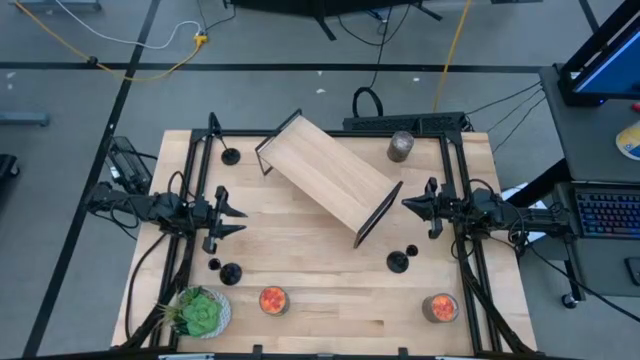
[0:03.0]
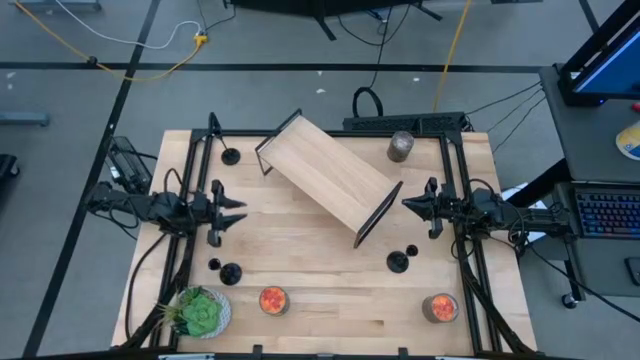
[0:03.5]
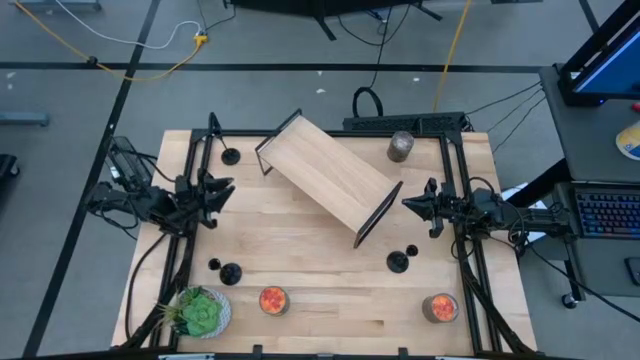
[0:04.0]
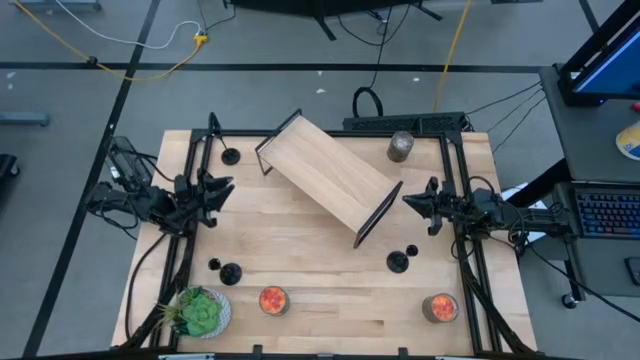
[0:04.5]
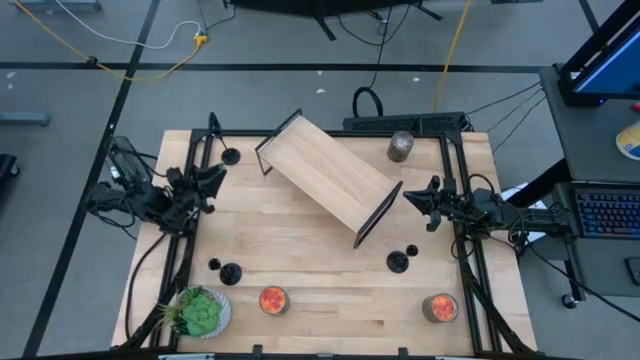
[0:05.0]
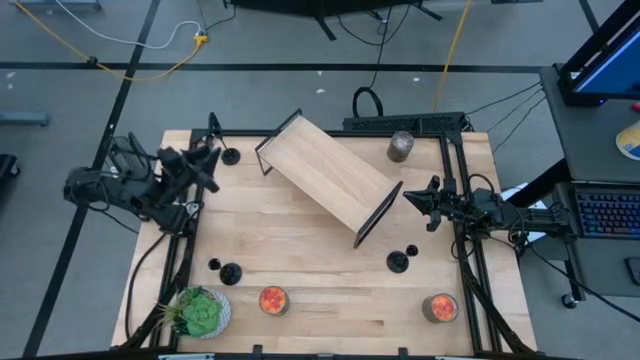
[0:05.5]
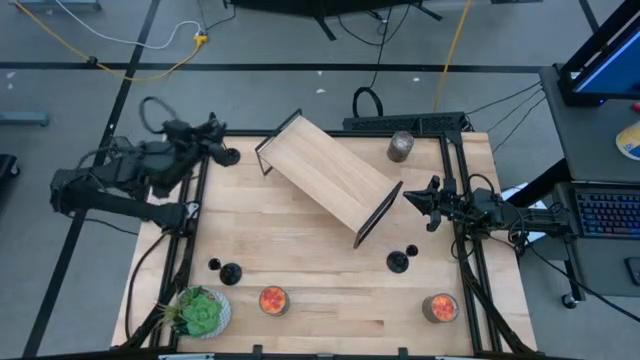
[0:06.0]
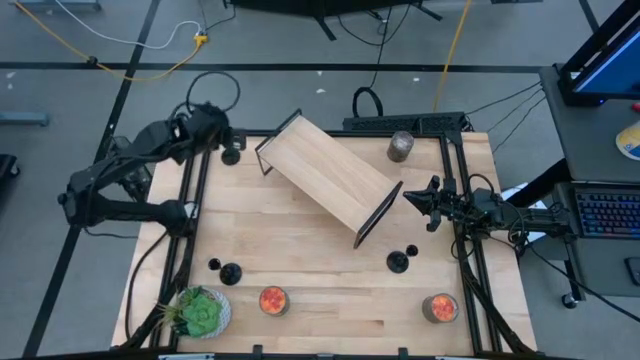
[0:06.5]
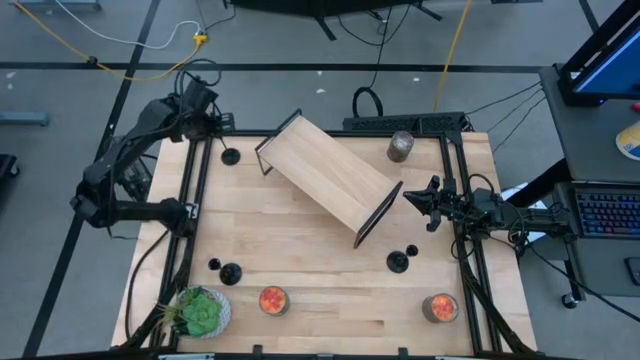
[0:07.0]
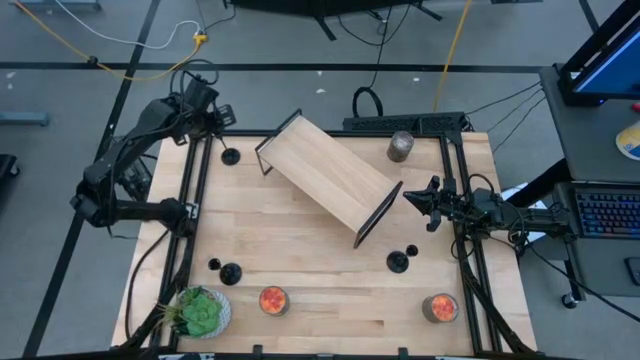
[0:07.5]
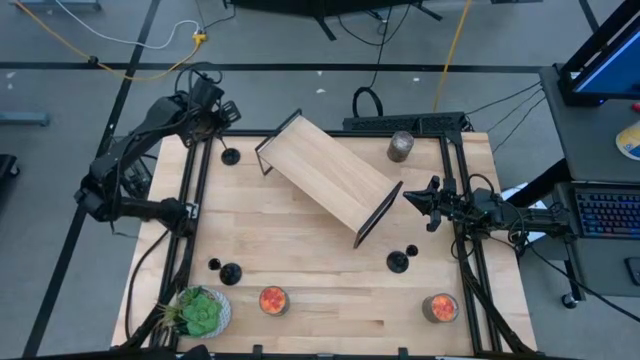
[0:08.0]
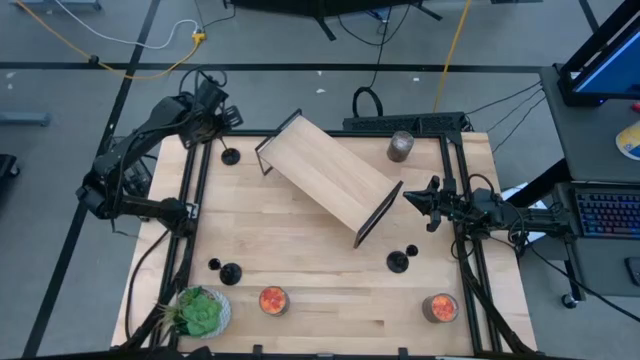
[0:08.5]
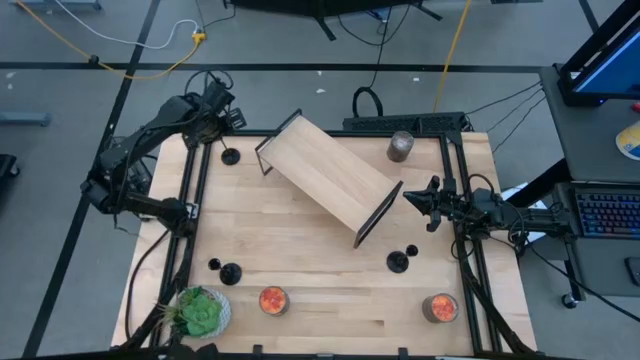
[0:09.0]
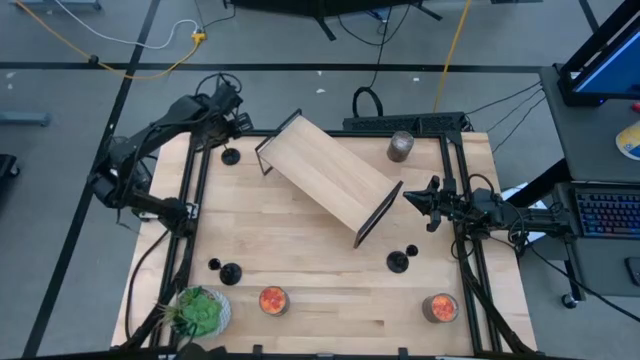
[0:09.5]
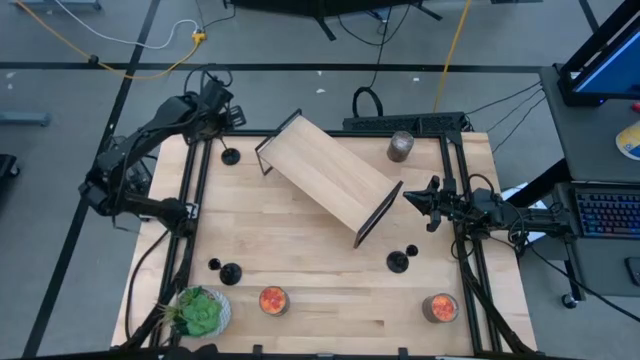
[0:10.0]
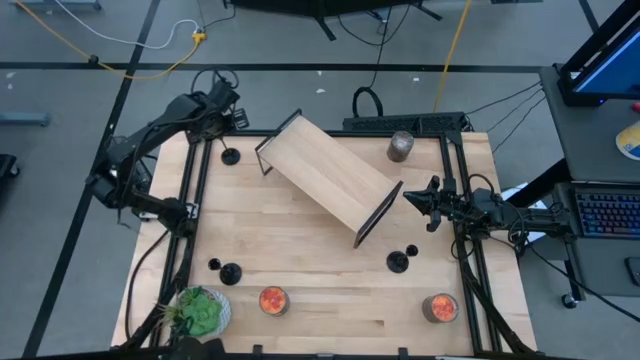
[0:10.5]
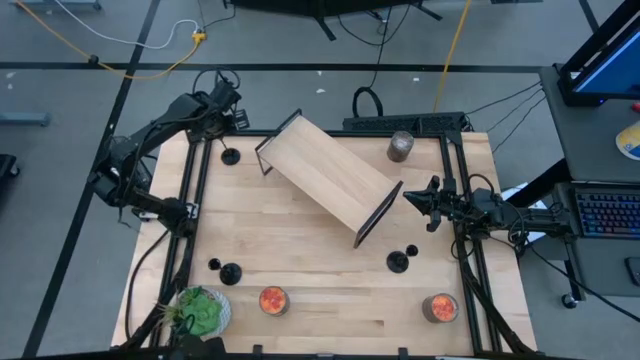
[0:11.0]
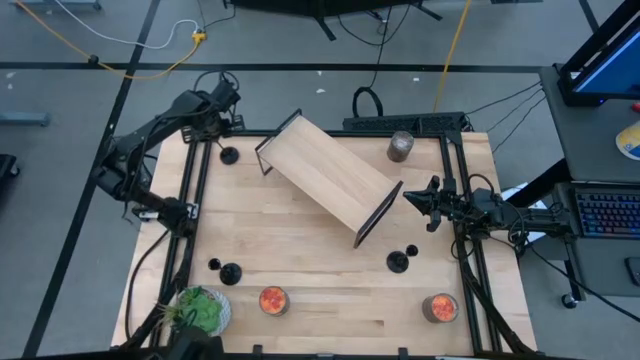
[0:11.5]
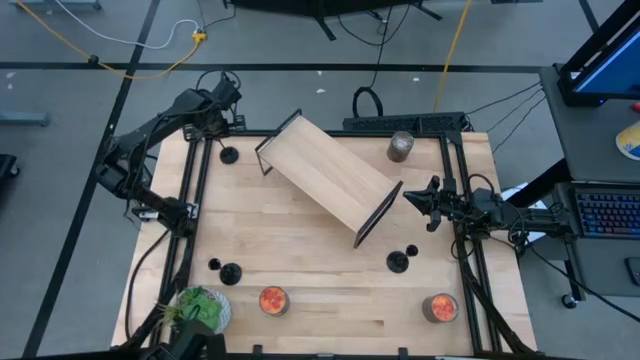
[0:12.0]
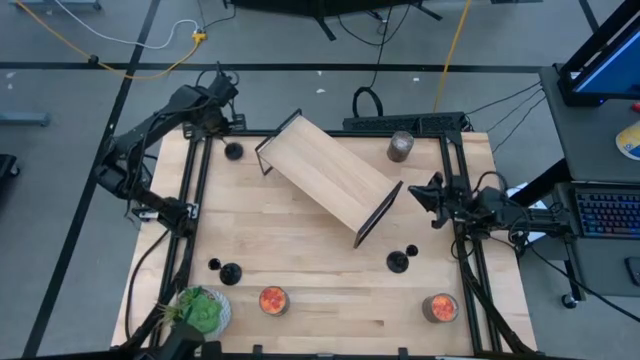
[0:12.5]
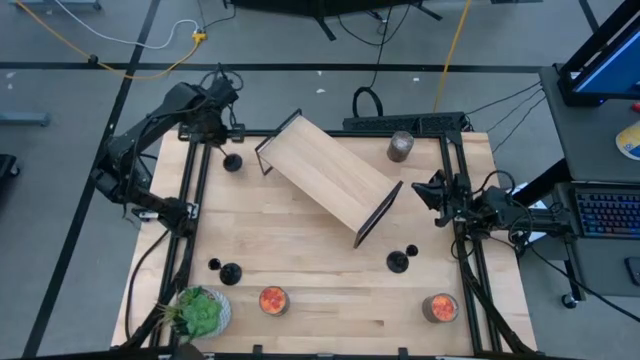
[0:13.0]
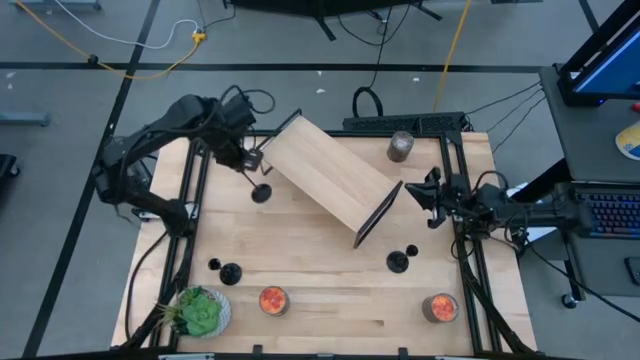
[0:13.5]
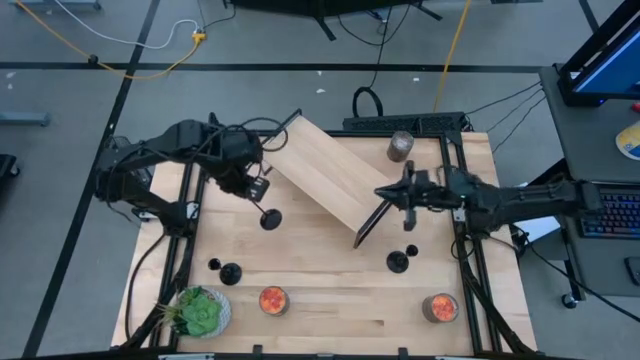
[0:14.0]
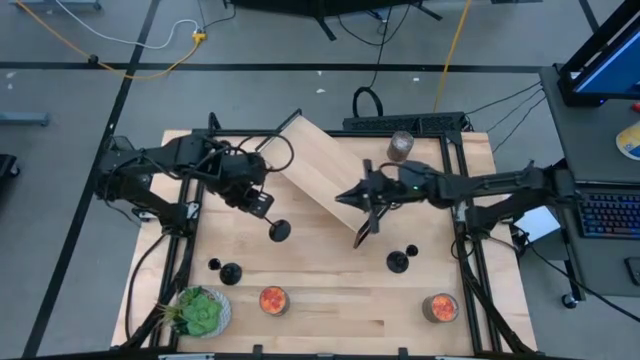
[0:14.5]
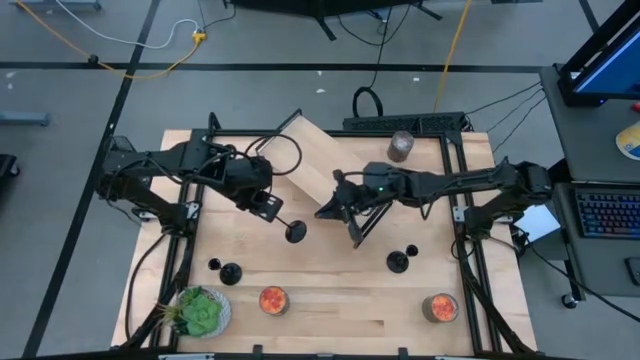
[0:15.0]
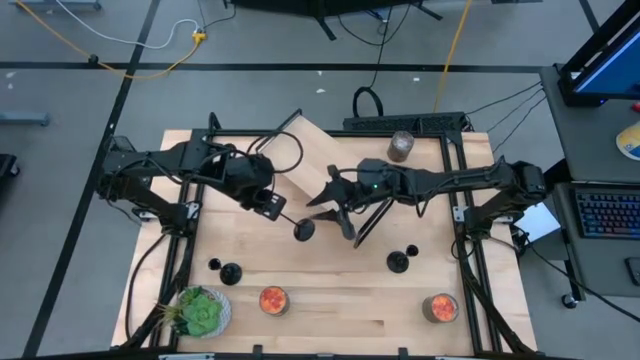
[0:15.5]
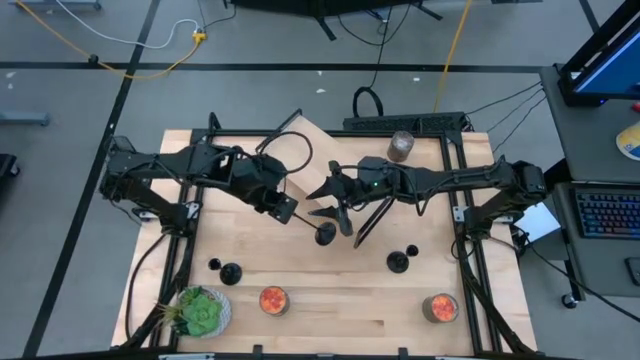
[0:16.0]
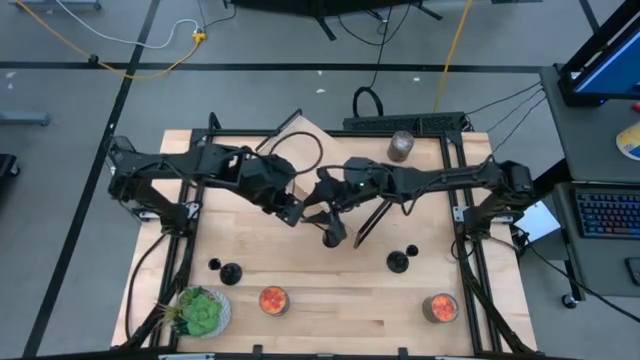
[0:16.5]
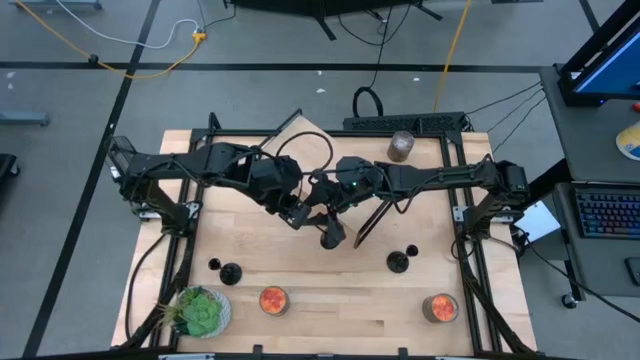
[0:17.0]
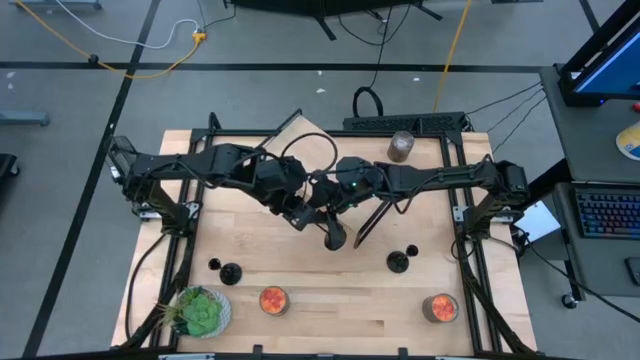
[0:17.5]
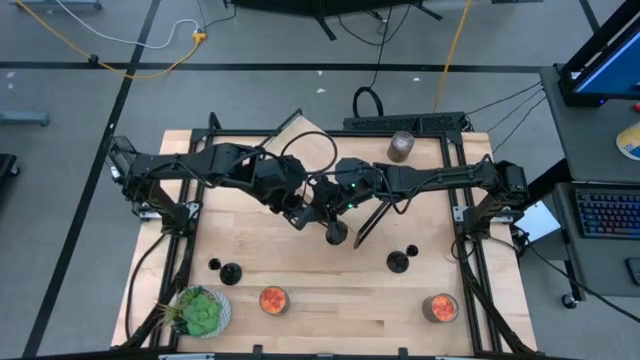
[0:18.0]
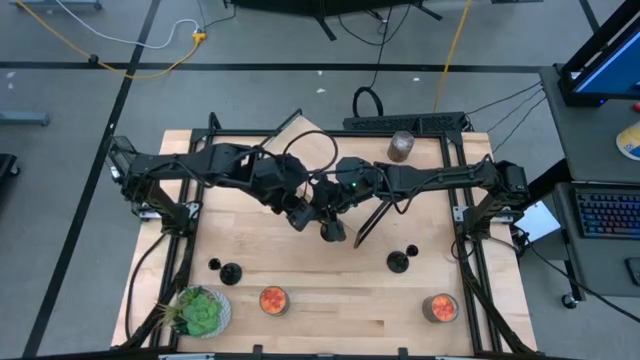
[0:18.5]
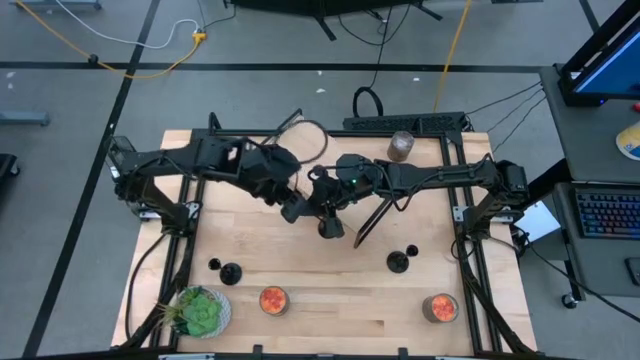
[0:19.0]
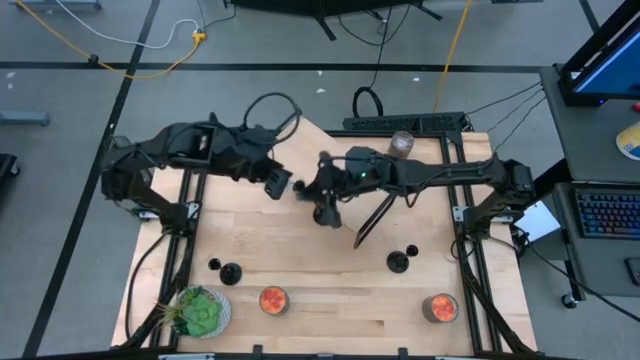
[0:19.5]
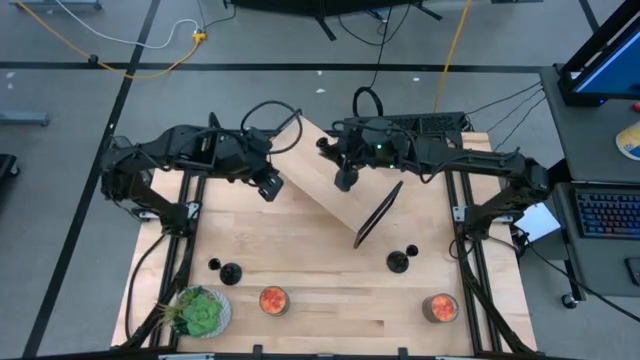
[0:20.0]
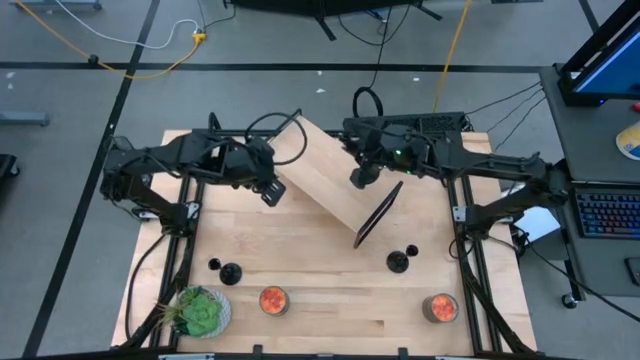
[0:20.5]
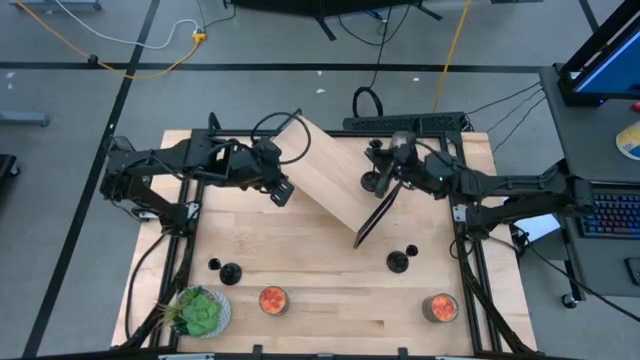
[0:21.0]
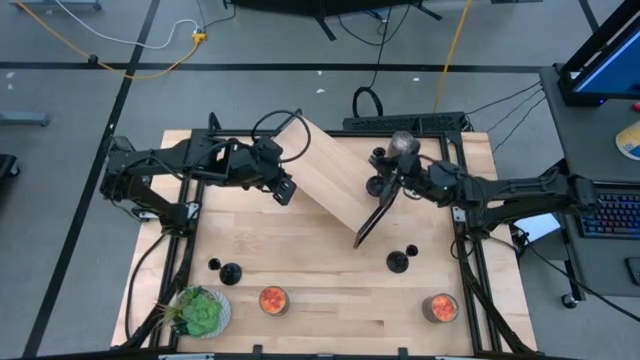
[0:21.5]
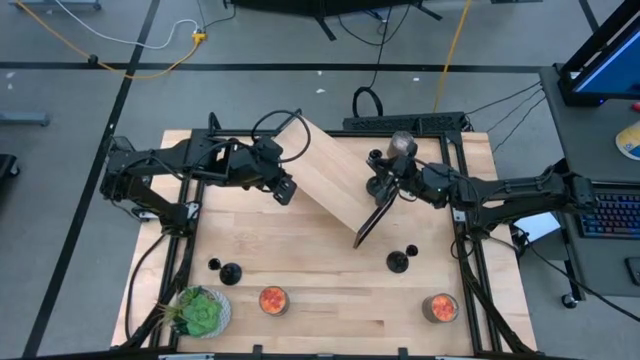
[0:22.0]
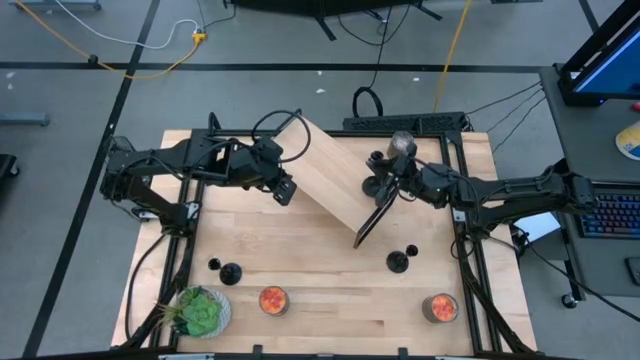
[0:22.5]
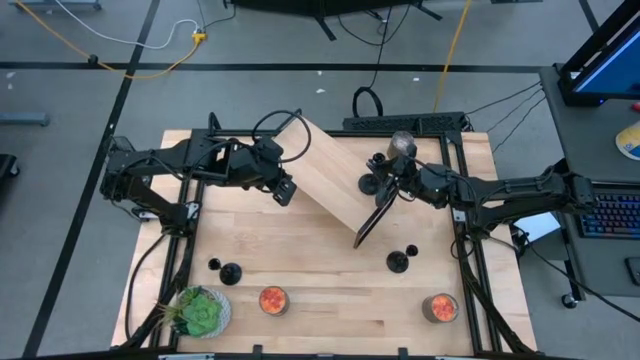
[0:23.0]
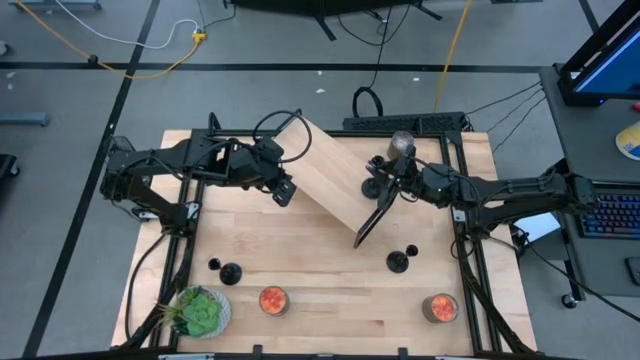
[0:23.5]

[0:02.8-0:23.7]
Task: Pick & Place candle stick holders
Put the top left black candle holder on the shelf

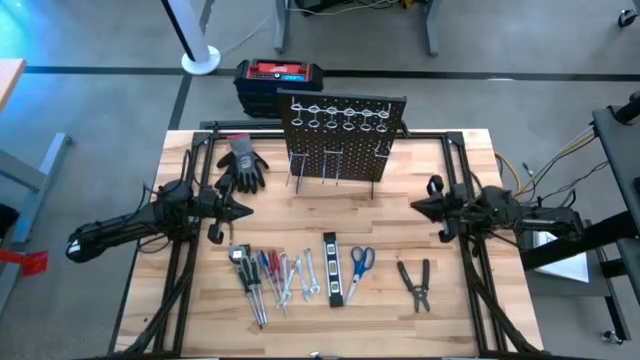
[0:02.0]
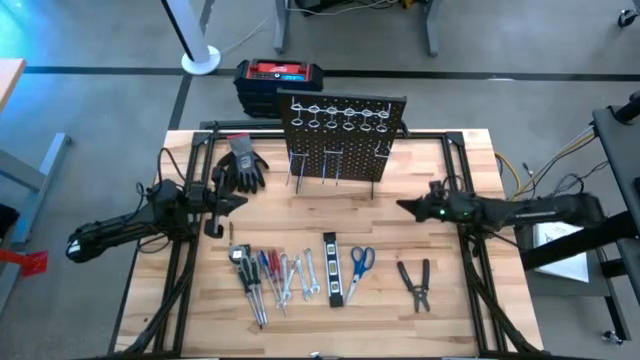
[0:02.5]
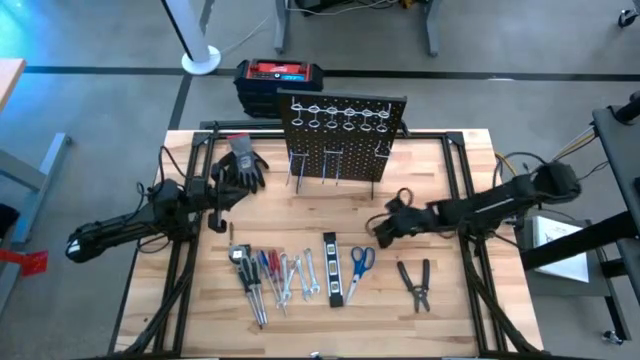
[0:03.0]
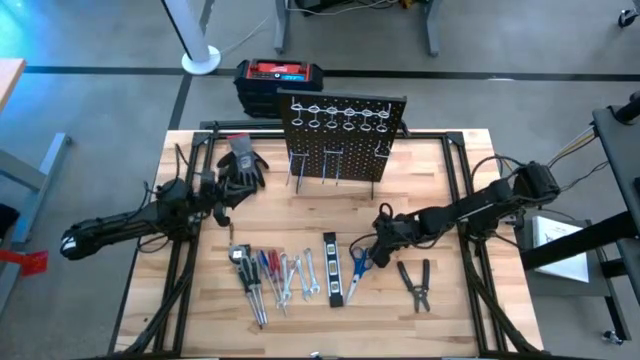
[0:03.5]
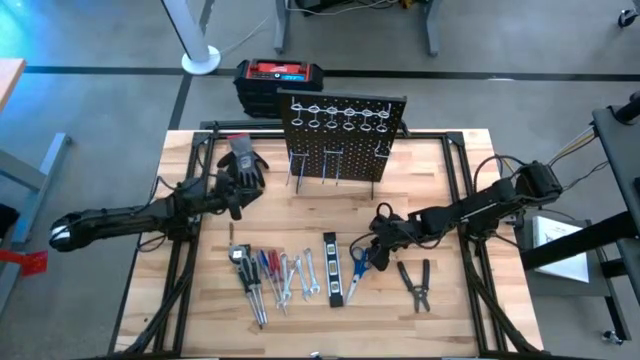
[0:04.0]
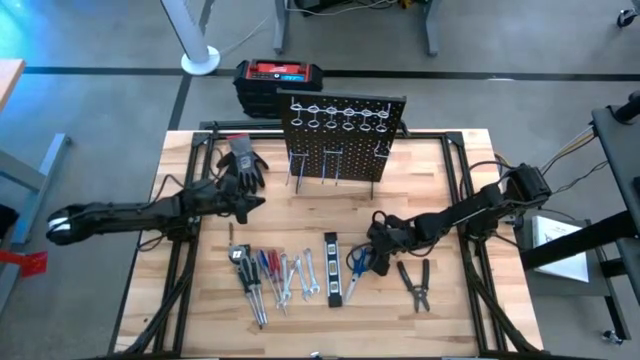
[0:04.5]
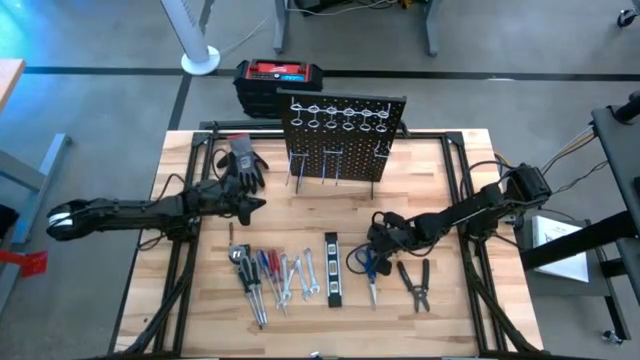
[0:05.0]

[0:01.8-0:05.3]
Task: Hang tools onto peg board
Hang the blue scissors on the peg board
